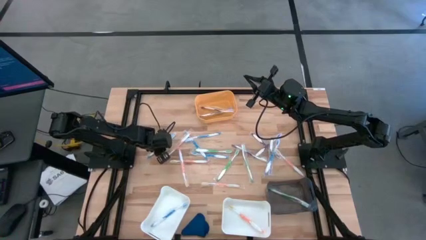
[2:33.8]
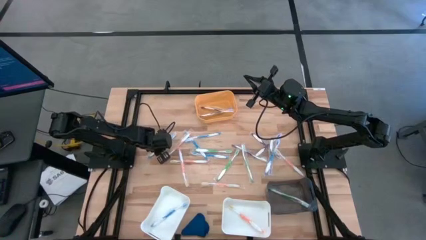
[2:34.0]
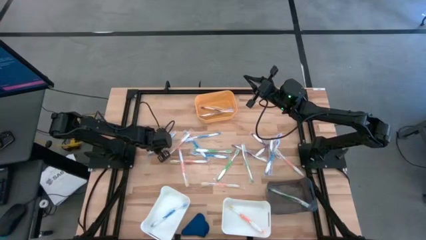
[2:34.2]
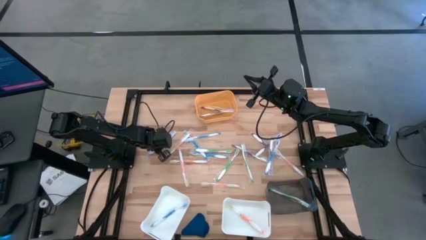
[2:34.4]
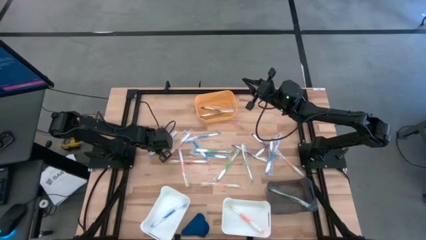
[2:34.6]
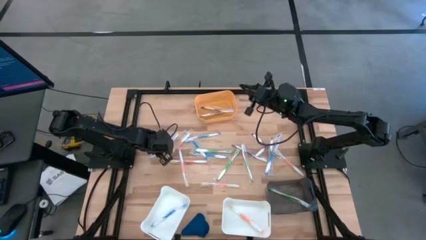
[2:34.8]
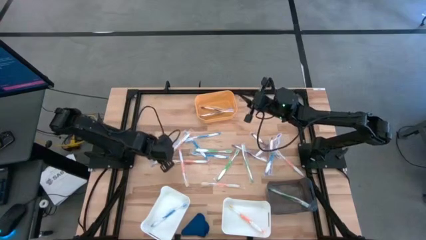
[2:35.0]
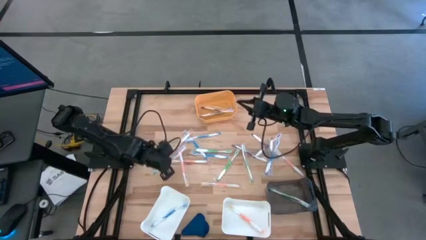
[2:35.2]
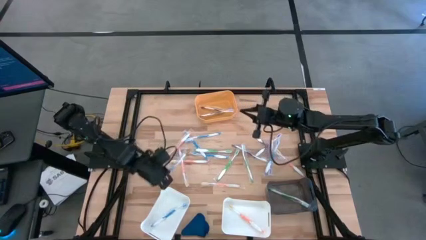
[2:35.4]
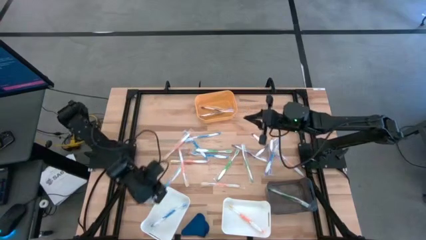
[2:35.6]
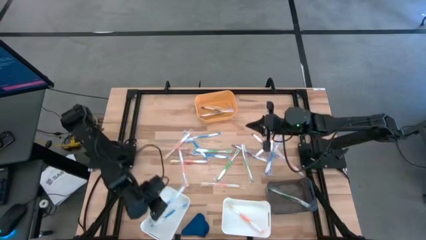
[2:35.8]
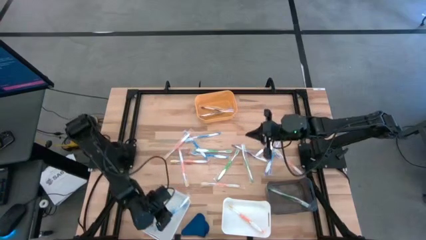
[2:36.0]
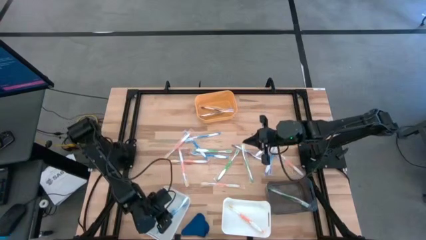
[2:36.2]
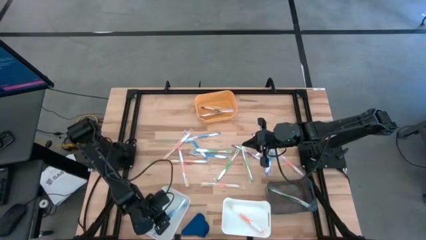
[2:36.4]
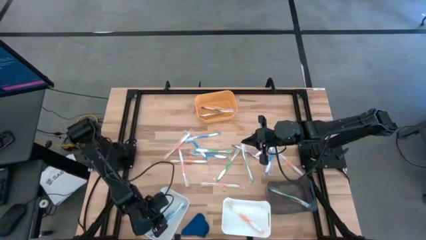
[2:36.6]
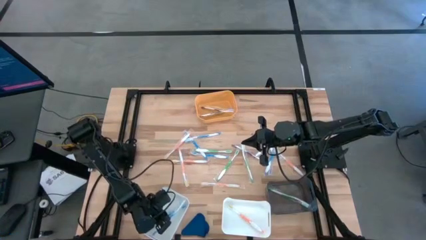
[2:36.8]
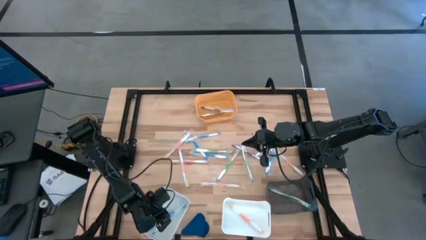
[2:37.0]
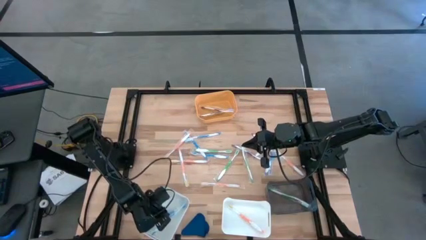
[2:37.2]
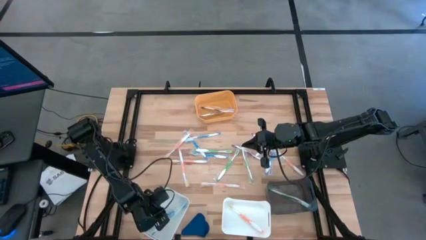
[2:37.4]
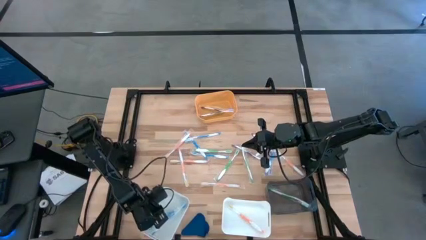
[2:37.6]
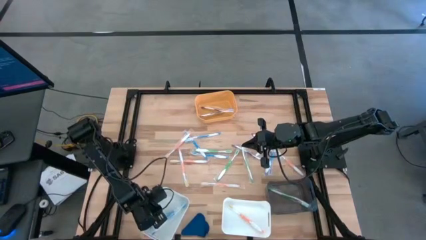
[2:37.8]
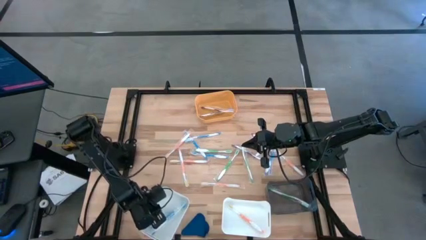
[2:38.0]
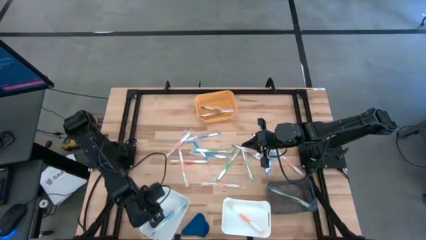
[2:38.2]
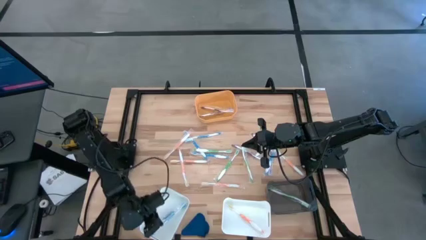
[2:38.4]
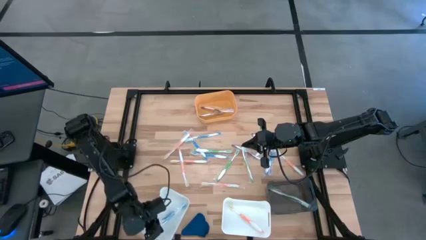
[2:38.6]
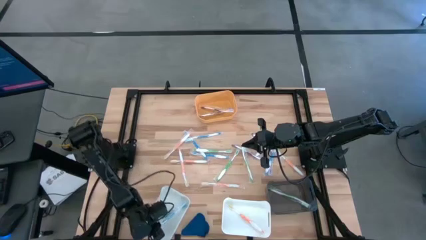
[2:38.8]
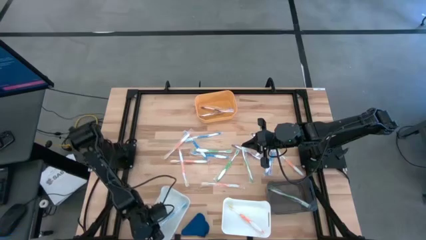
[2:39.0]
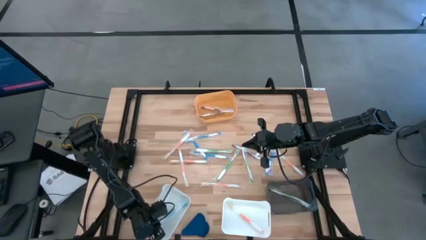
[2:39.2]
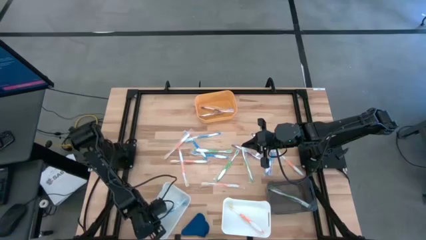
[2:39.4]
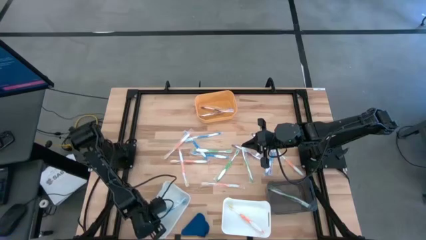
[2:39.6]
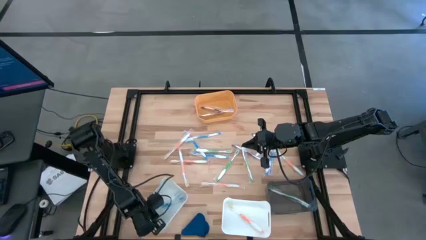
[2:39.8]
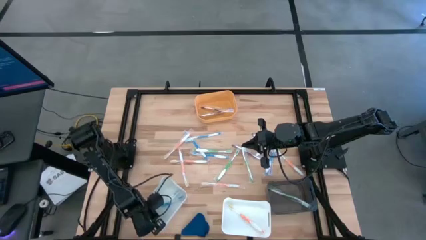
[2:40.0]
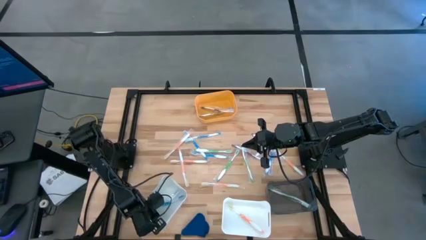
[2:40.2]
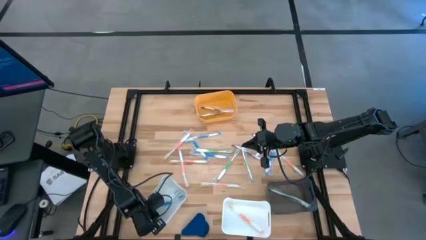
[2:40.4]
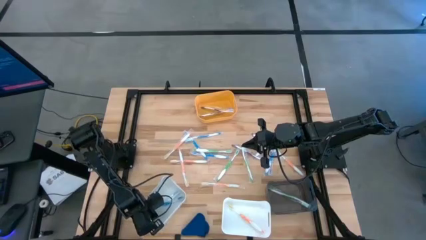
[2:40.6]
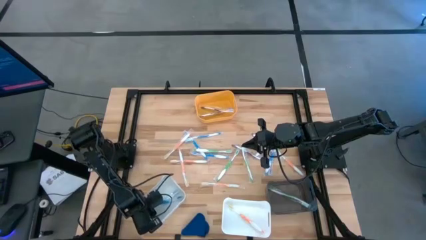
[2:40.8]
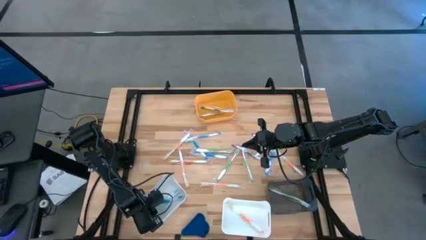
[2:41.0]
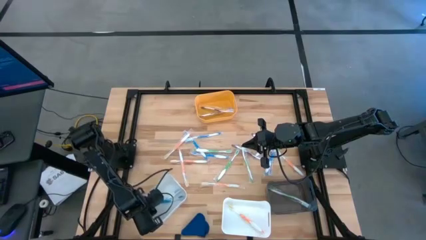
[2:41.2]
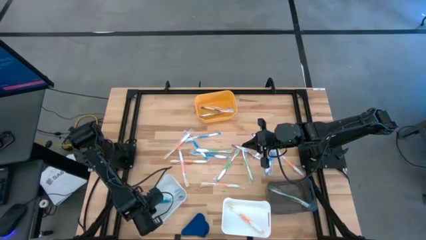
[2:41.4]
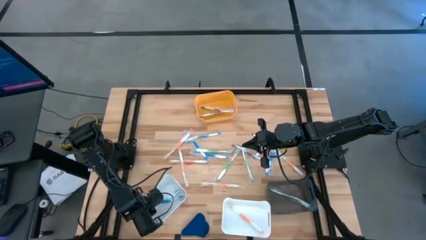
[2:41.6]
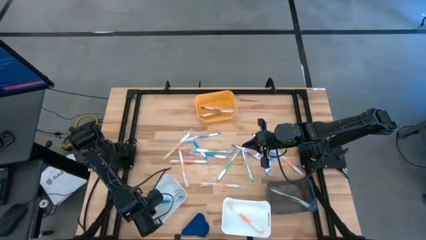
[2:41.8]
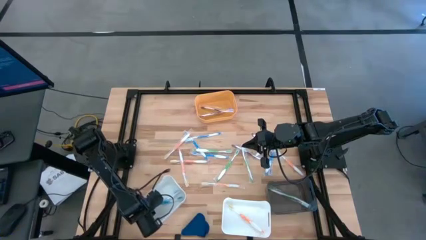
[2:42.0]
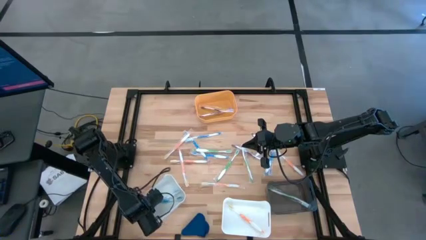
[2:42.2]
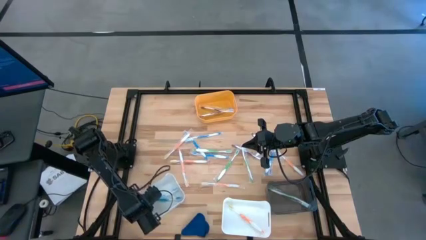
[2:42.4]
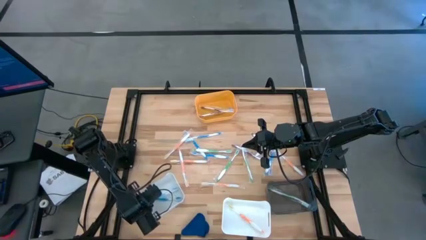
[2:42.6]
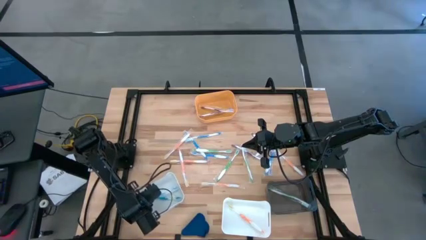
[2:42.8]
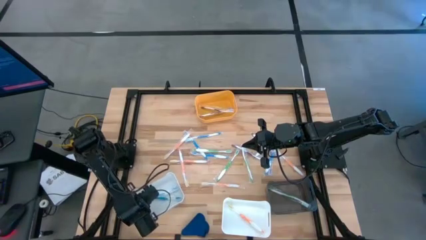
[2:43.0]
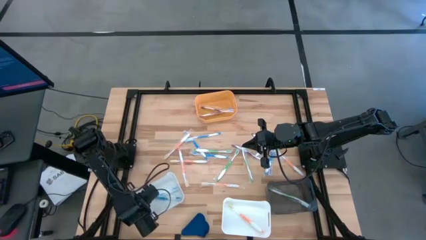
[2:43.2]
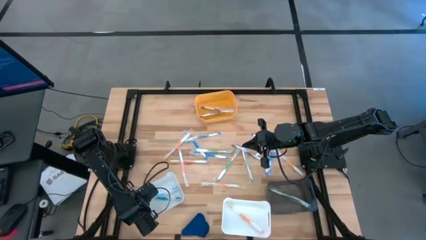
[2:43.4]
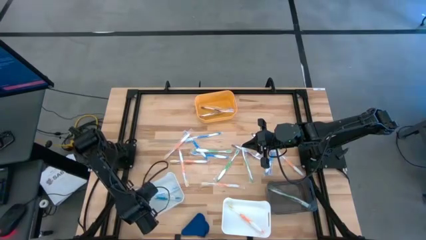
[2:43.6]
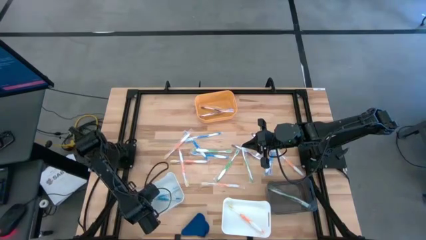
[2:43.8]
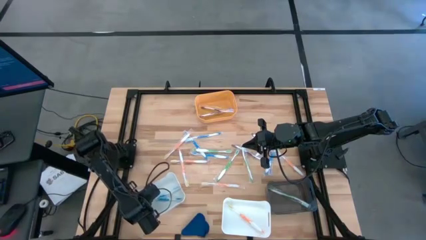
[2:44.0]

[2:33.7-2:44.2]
Task: Pick & Place Toothbrushes
Put the blue toothbrush into the left white bin

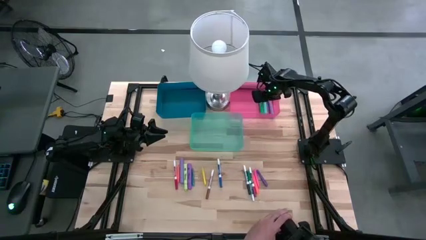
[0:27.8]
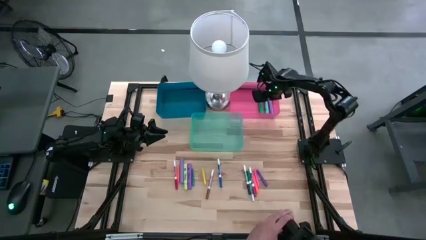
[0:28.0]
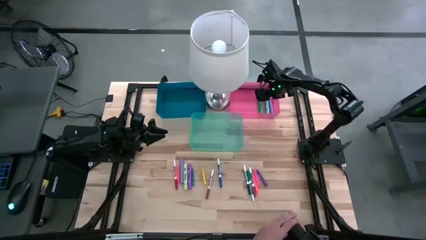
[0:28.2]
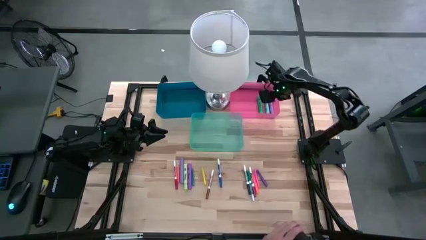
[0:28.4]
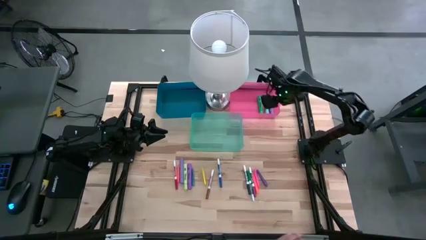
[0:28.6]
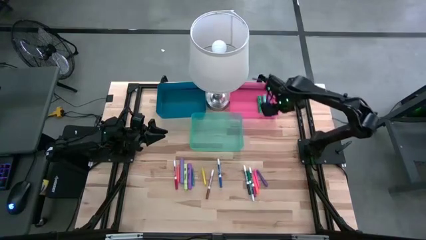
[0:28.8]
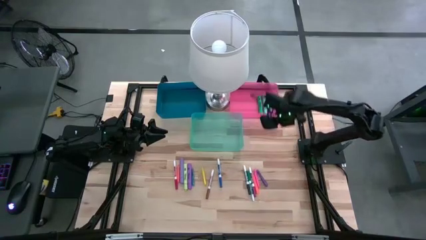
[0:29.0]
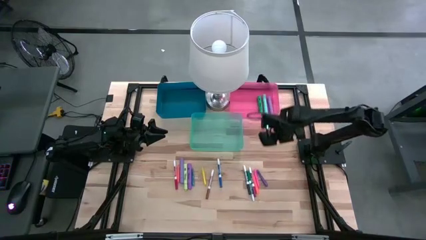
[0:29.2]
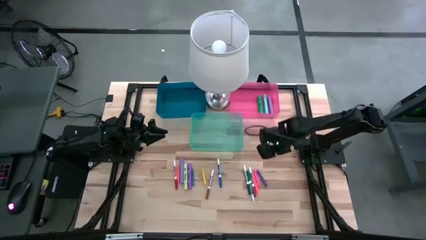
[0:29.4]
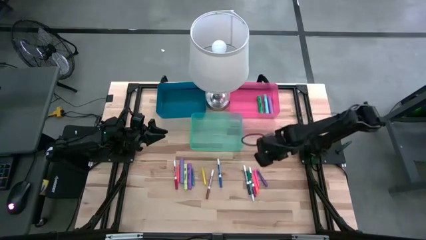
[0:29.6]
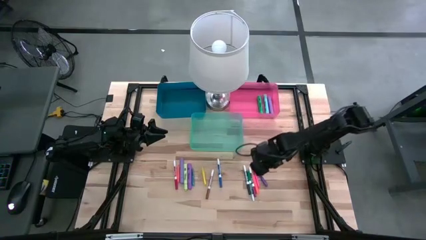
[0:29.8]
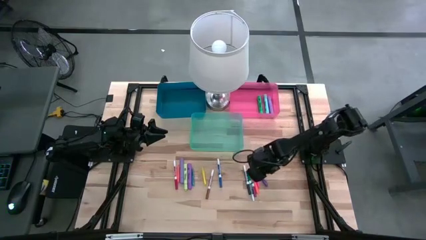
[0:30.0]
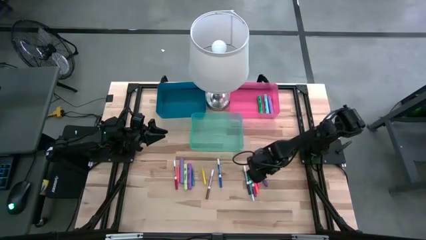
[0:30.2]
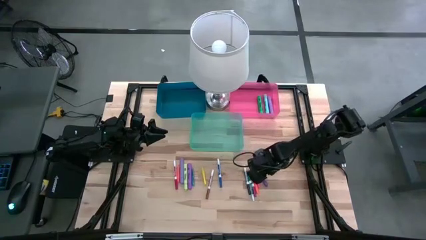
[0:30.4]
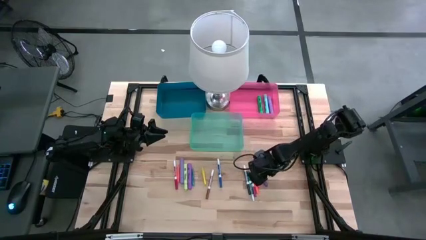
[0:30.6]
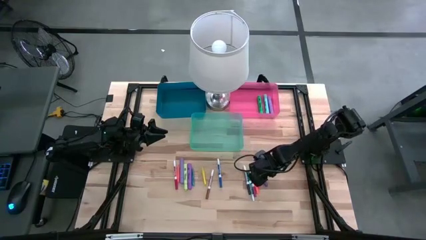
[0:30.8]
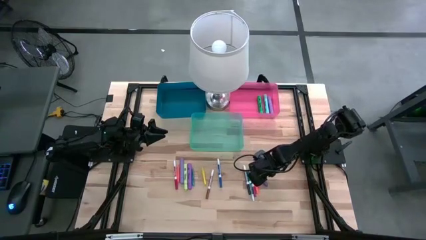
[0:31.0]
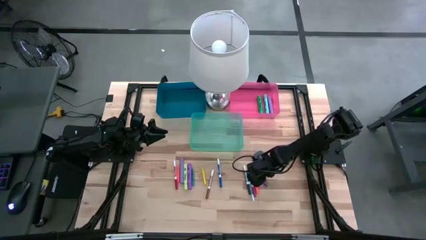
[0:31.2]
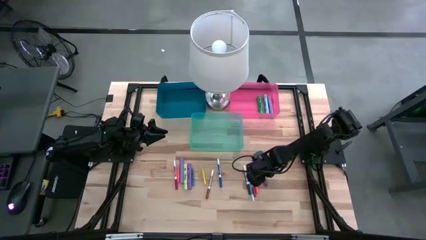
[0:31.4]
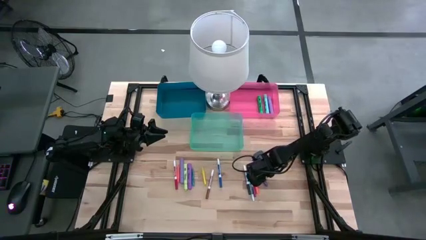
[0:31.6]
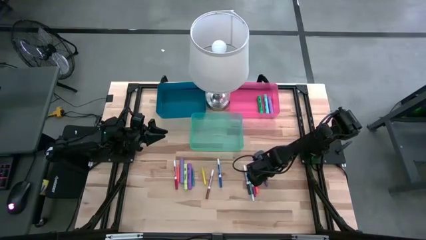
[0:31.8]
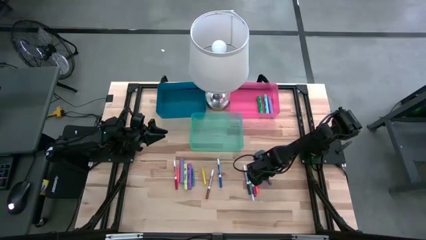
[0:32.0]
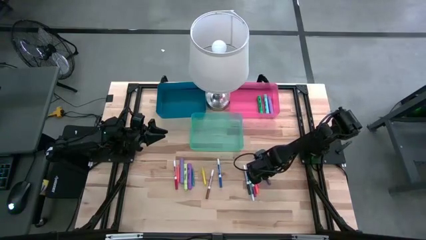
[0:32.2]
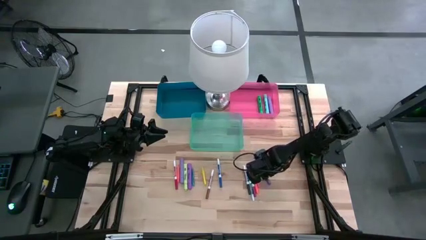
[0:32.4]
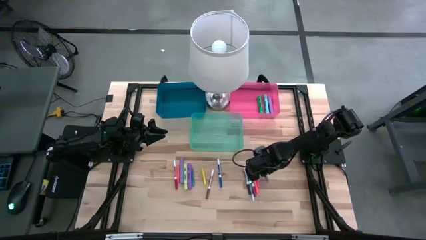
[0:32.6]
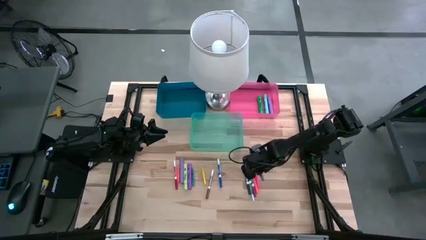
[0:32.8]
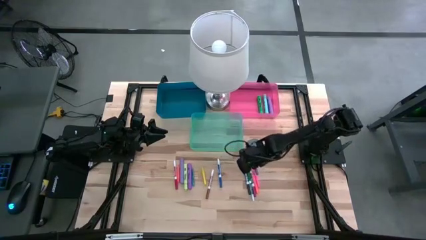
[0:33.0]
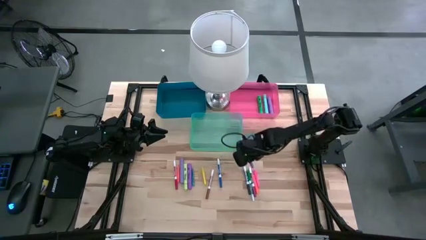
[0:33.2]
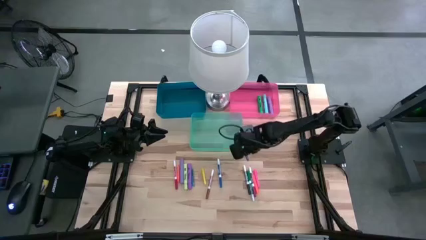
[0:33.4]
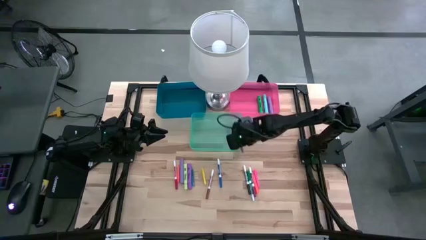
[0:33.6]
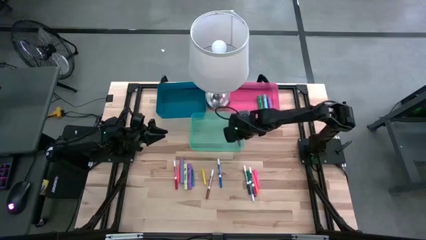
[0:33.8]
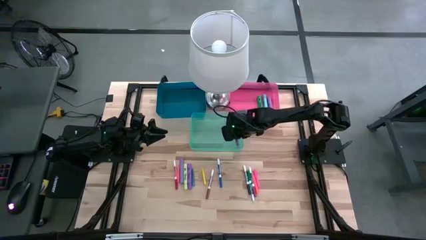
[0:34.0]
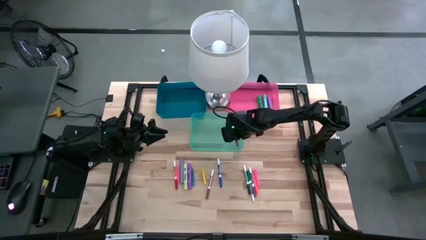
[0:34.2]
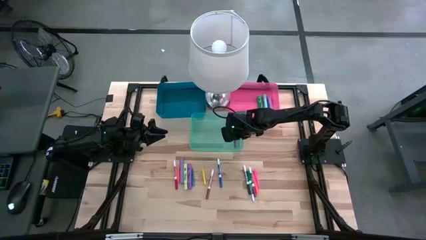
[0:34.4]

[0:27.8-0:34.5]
Task: Pick & Place Markers
Put the dark blue pen into the green bin
